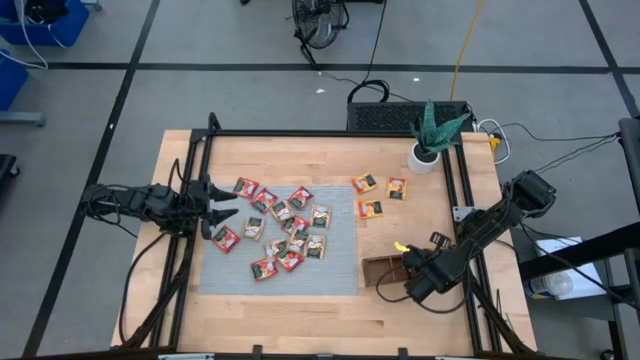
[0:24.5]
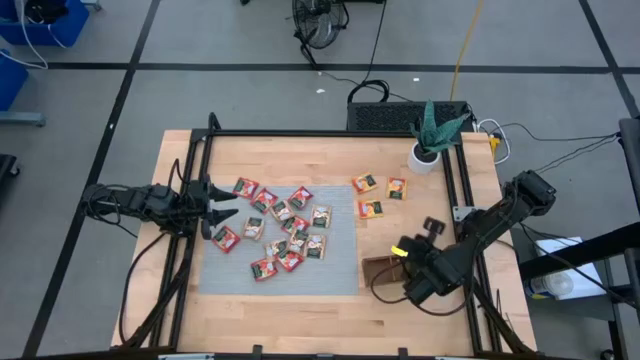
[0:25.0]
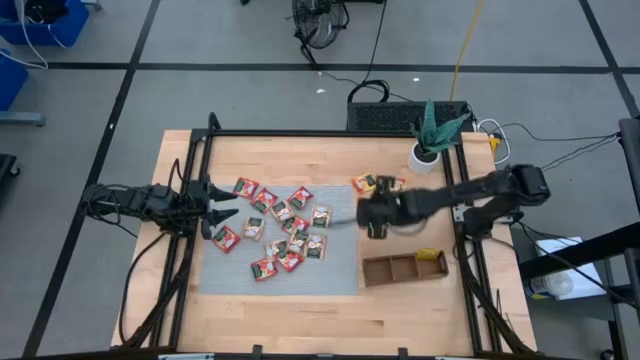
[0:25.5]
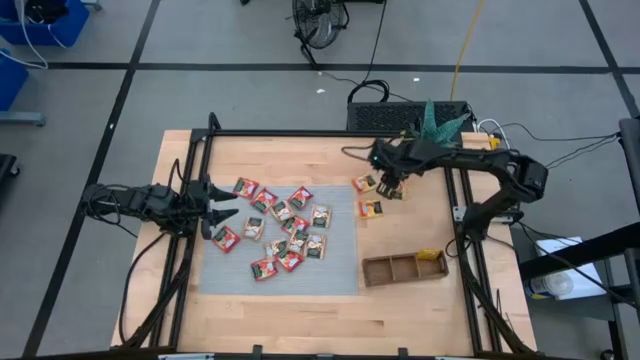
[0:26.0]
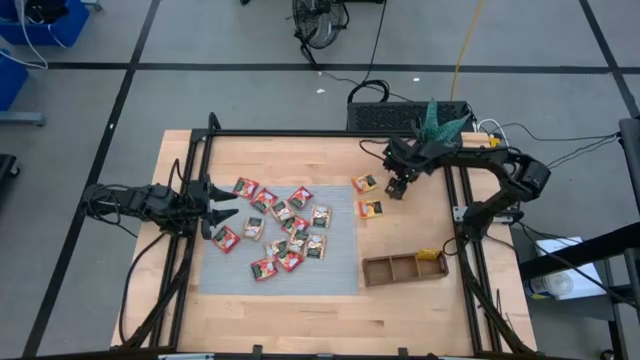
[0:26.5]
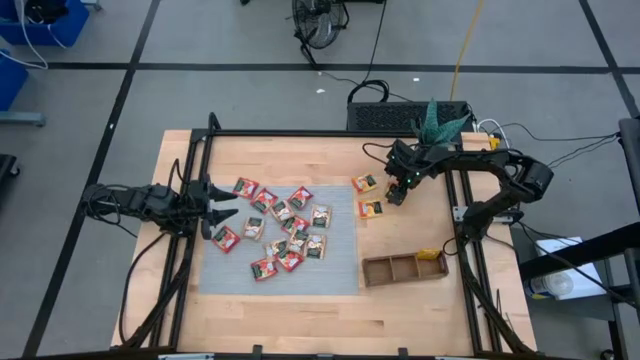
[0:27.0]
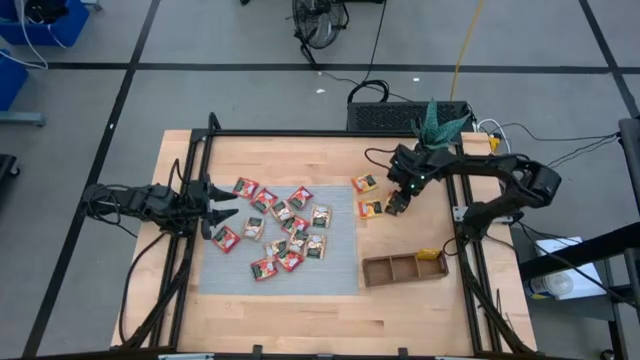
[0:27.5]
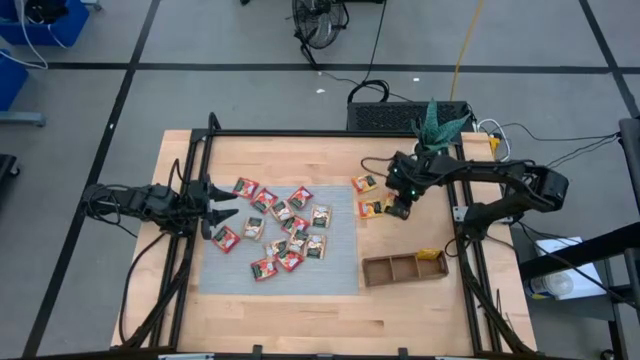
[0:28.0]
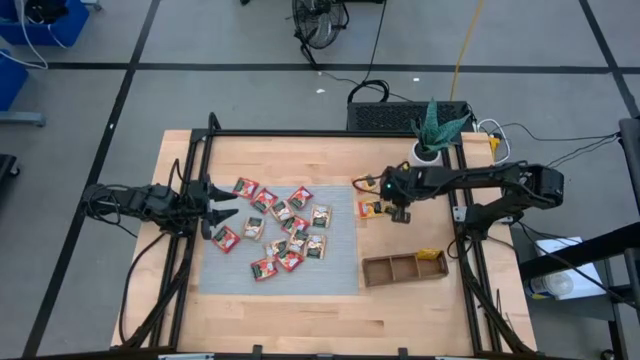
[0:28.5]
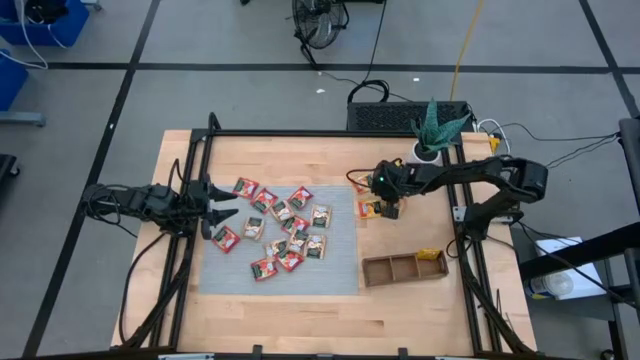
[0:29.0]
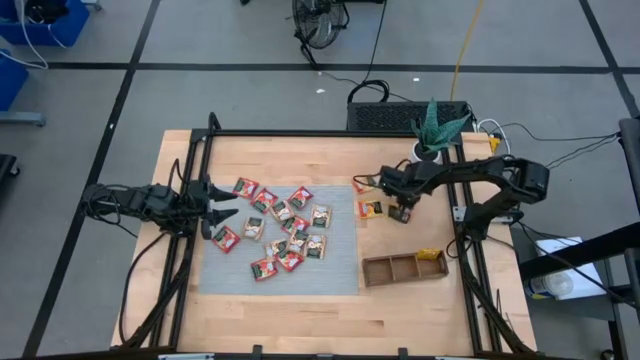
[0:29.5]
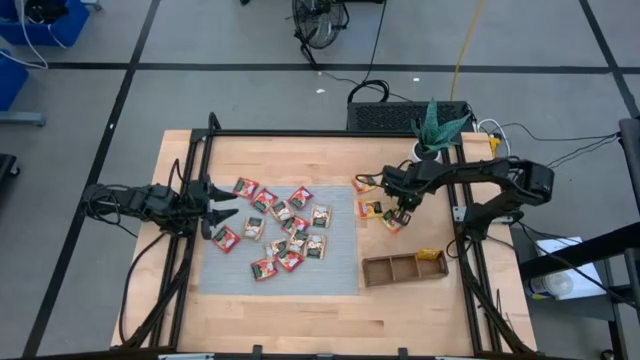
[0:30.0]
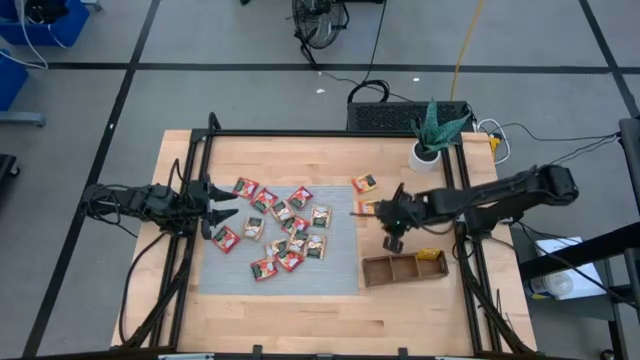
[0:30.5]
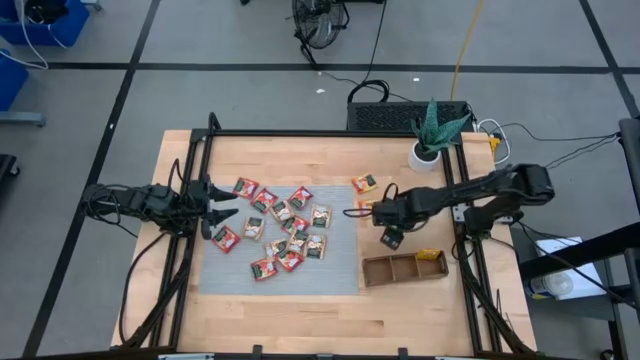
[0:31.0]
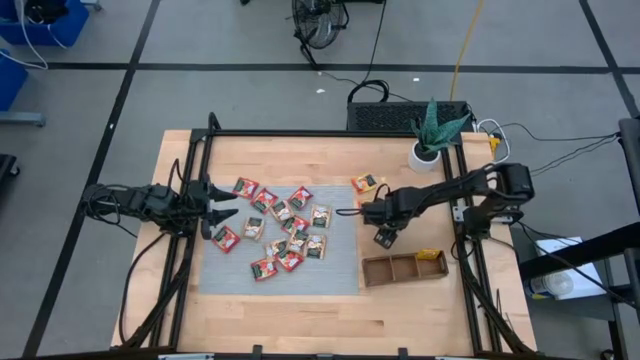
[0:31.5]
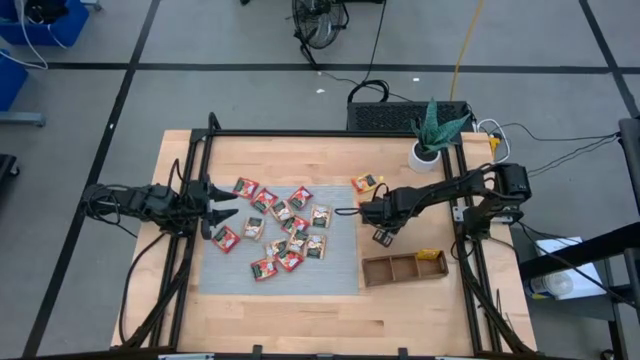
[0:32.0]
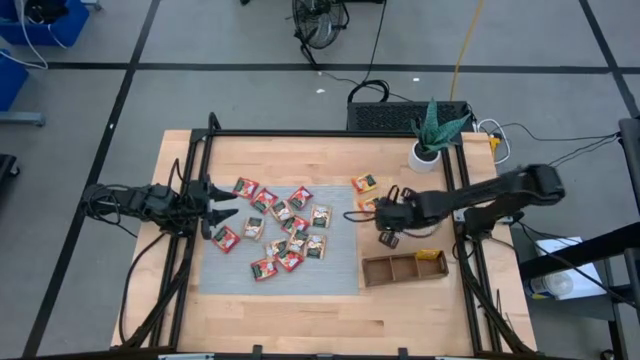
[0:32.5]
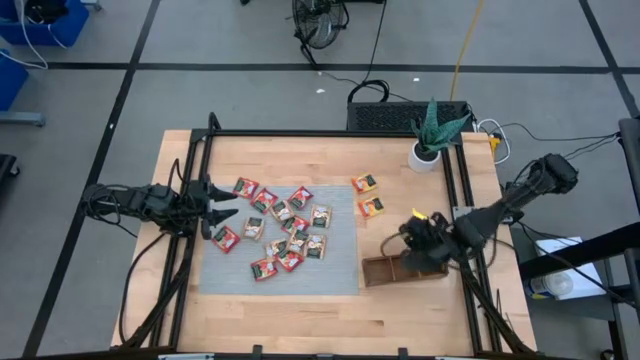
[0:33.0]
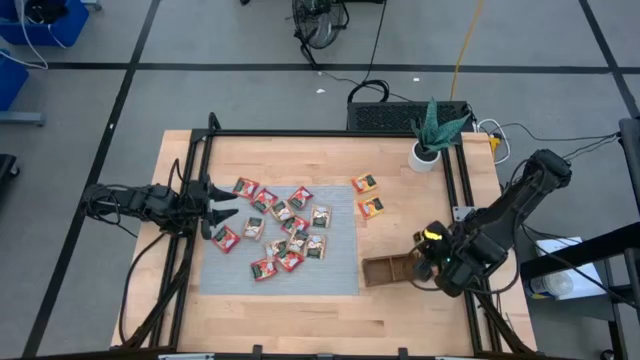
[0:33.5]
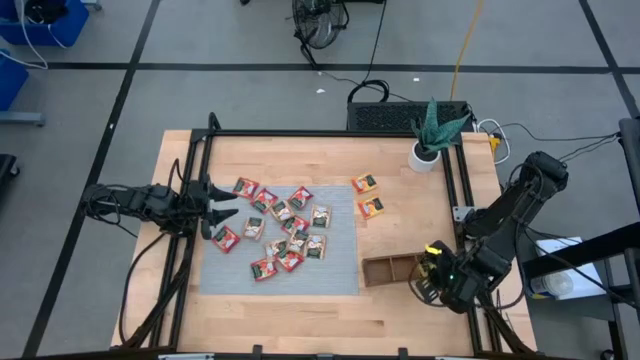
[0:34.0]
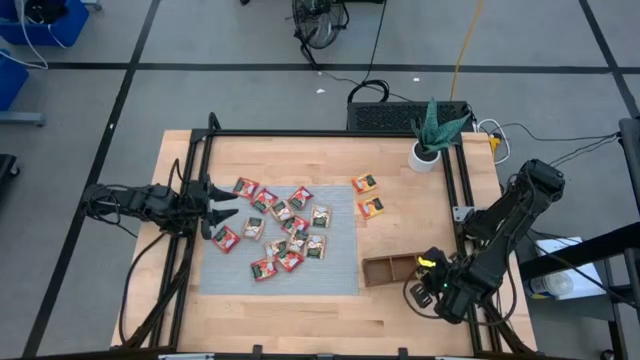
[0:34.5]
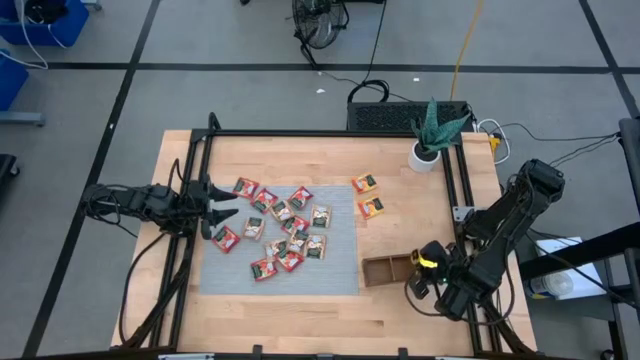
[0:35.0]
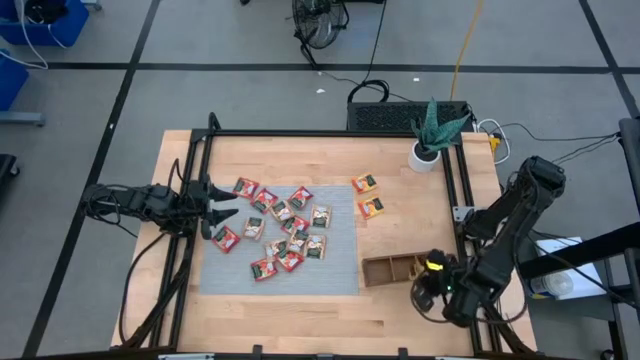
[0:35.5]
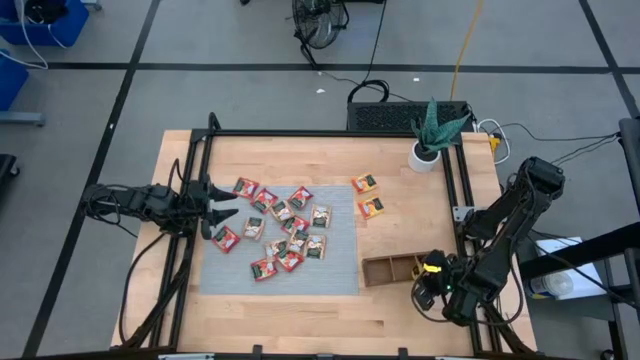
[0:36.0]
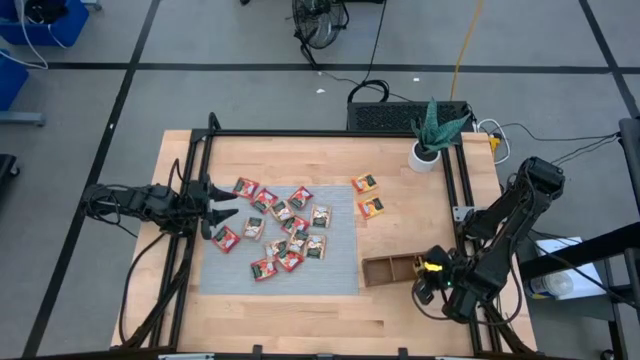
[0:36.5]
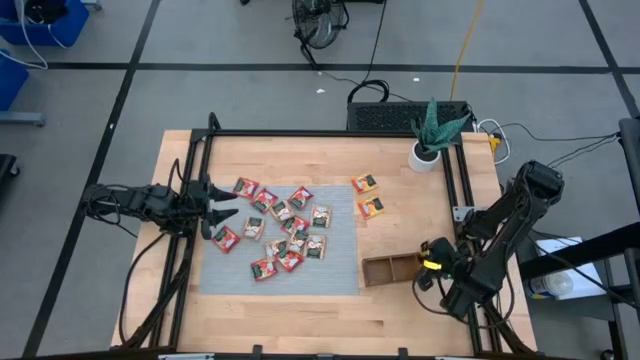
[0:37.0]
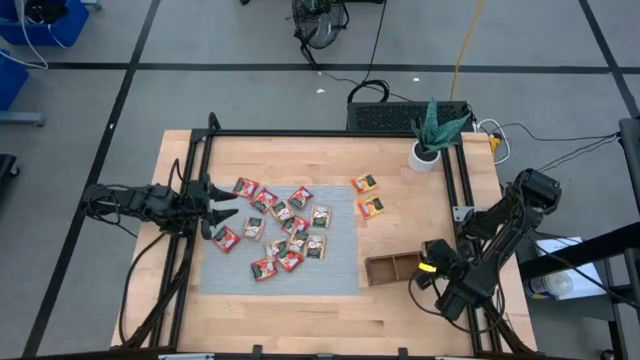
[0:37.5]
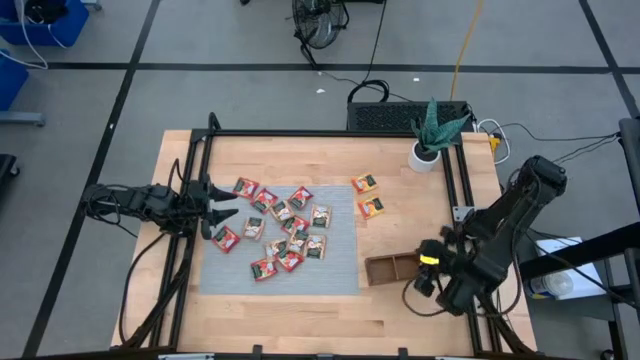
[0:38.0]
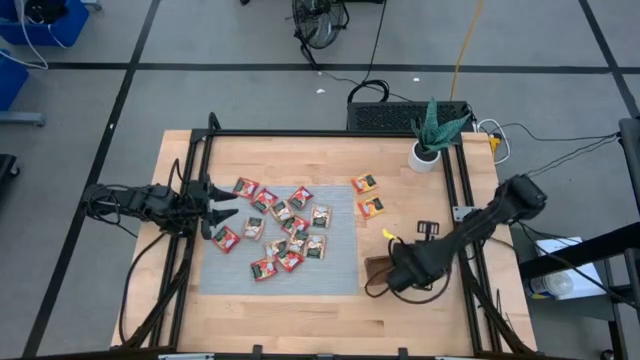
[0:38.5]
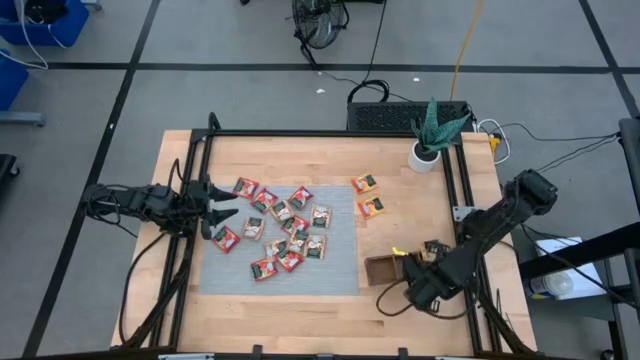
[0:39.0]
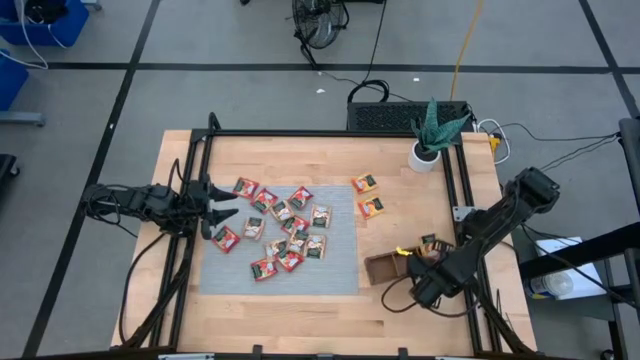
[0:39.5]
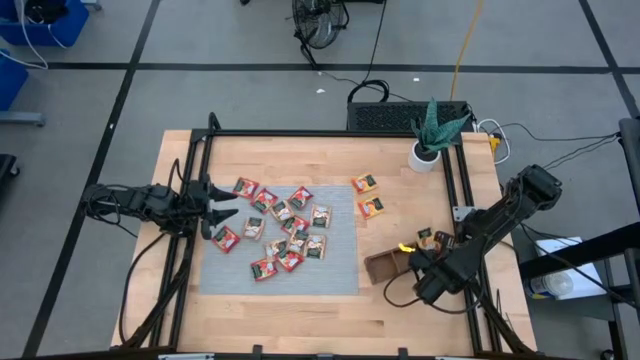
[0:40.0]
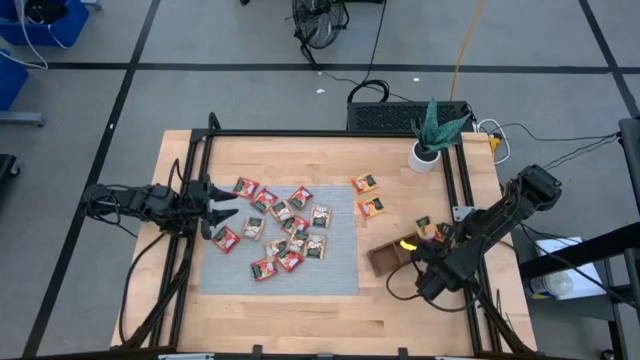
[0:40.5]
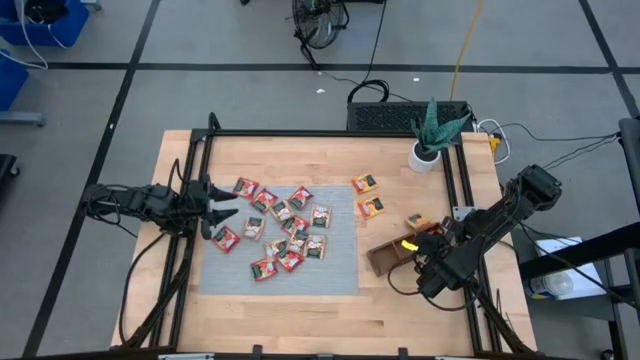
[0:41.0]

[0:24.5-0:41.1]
Task: Pick & Place Tea
Put the yellow tea bag into the right section of the wooden organizer

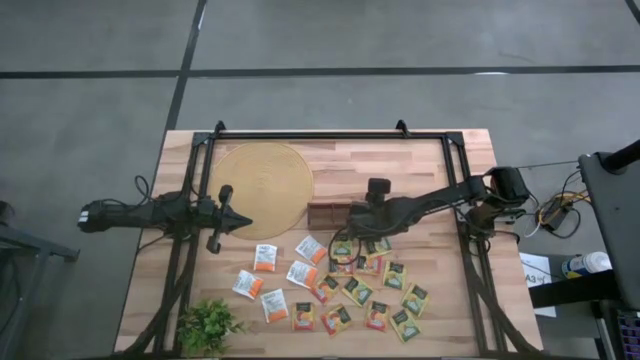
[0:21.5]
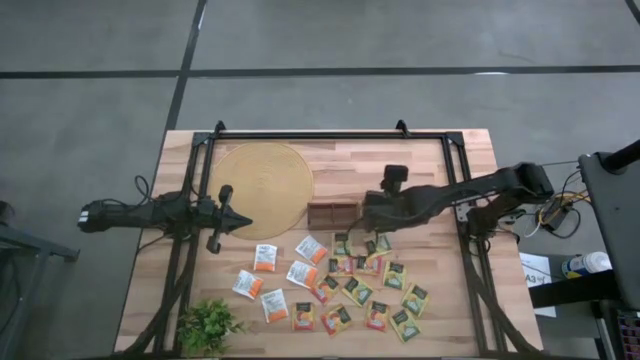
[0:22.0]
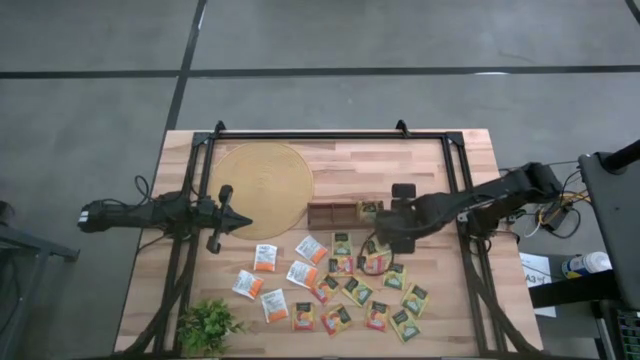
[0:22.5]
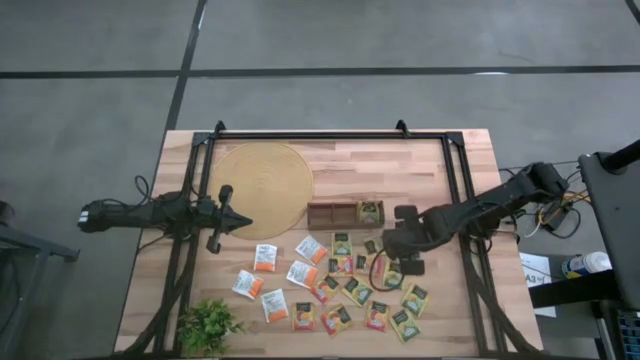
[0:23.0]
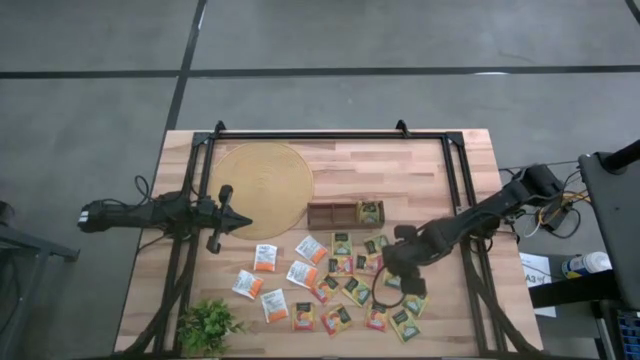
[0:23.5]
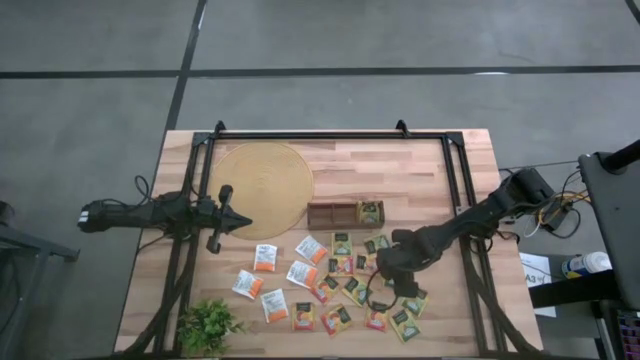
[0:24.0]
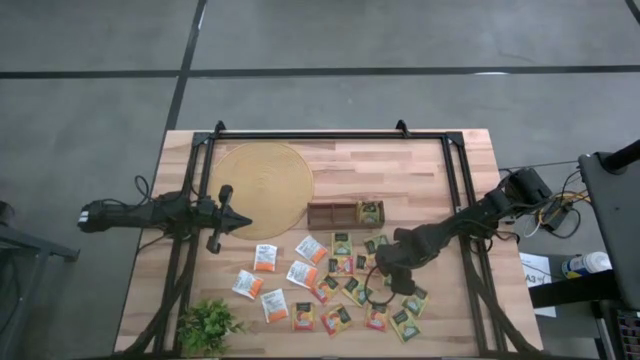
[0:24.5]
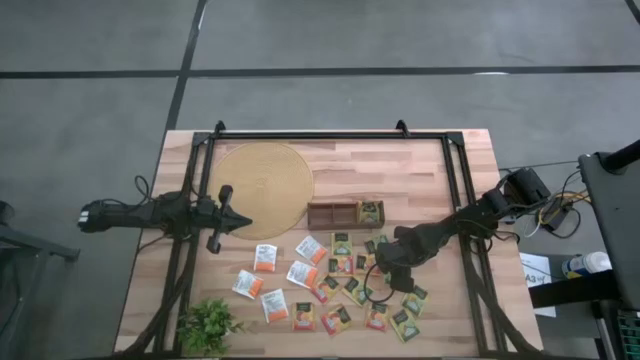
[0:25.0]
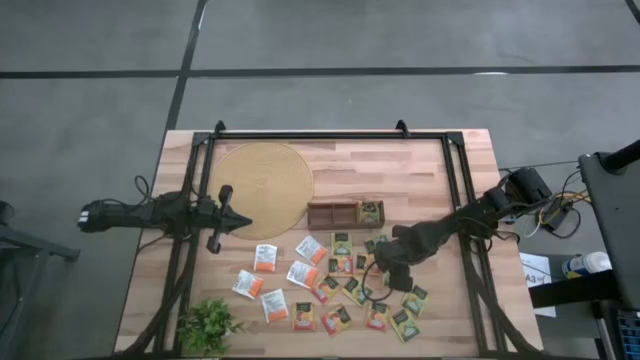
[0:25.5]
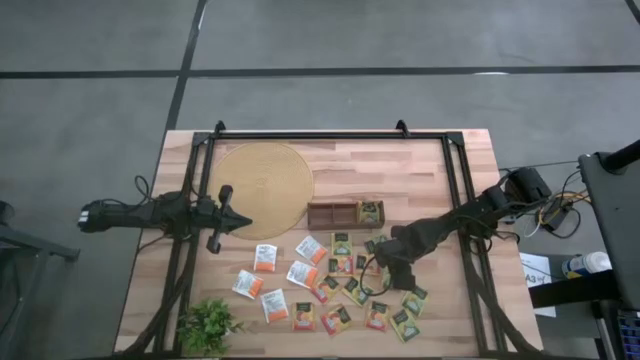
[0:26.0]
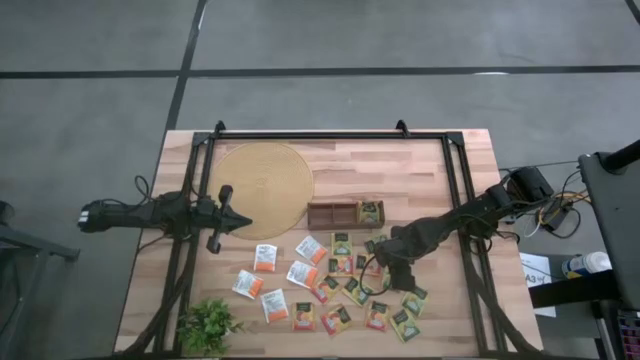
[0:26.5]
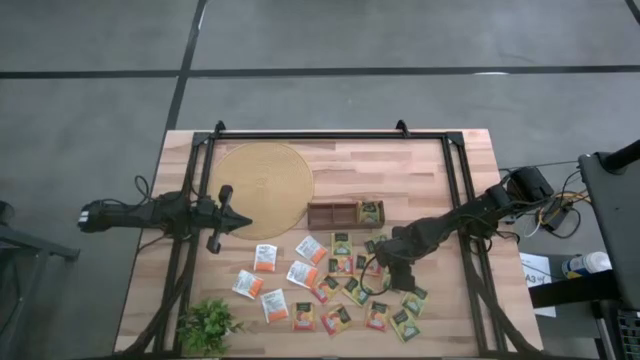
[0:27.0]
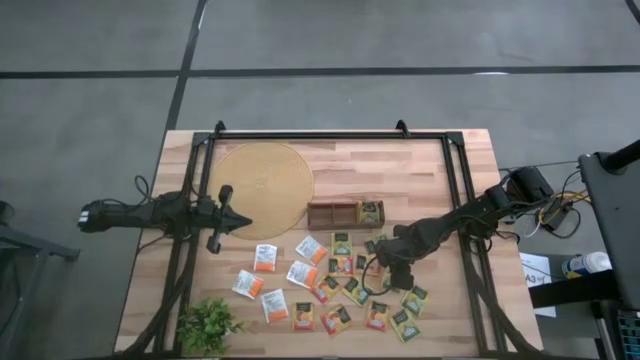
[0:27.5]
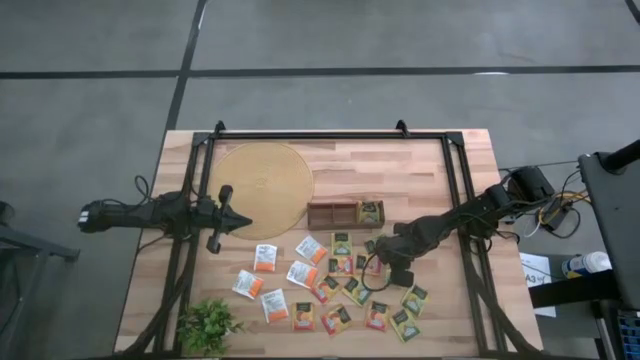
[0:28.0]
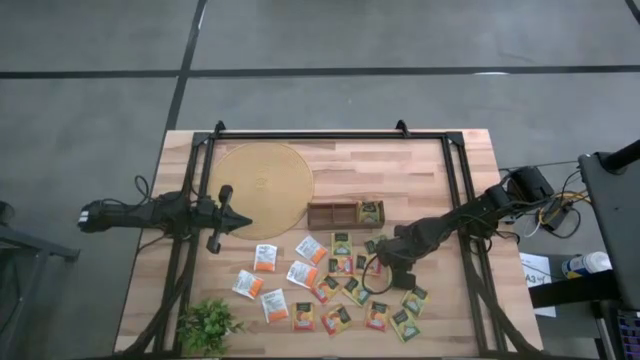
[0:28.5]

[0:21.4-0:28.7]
Task: Pick & Place Tea
Put the yellow tea bag into the right section of the wooden organizer
